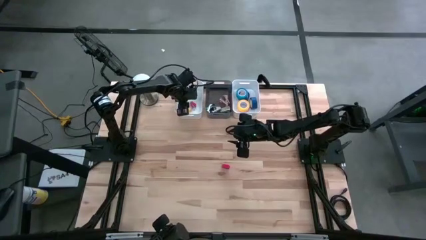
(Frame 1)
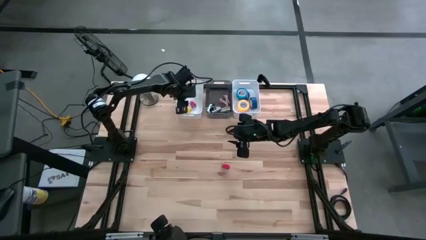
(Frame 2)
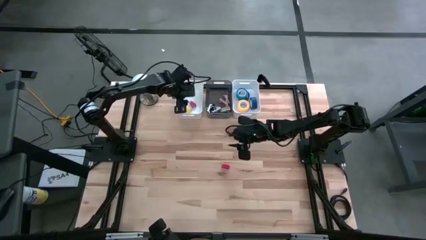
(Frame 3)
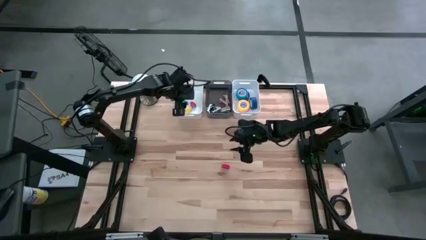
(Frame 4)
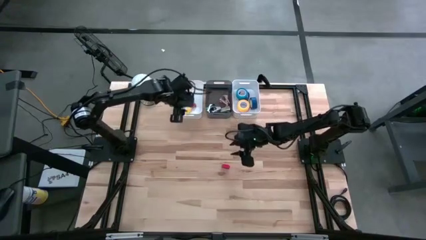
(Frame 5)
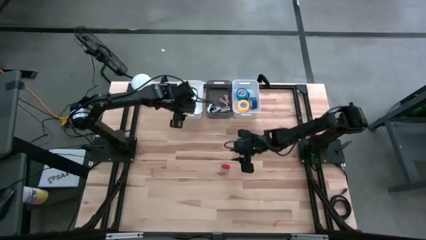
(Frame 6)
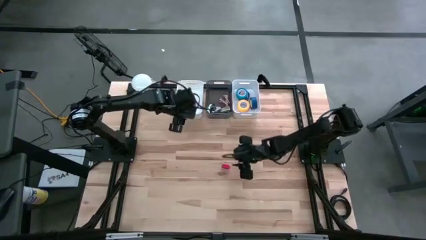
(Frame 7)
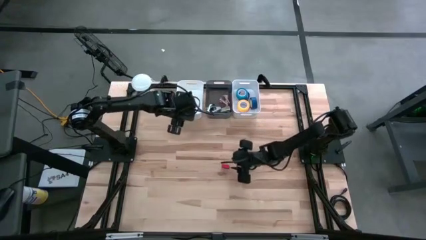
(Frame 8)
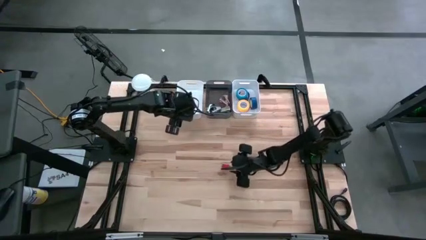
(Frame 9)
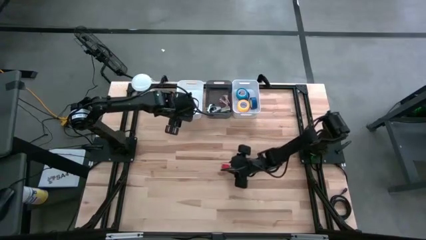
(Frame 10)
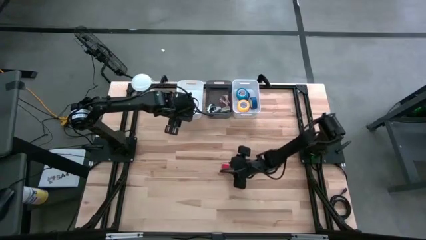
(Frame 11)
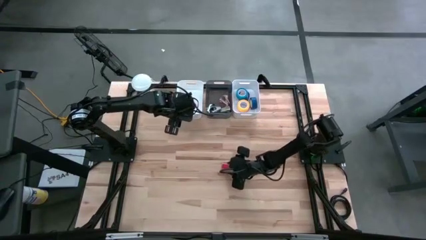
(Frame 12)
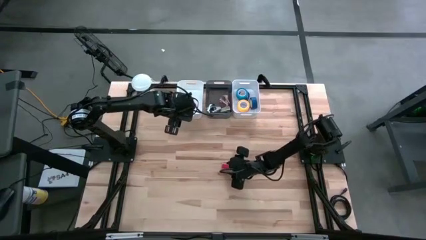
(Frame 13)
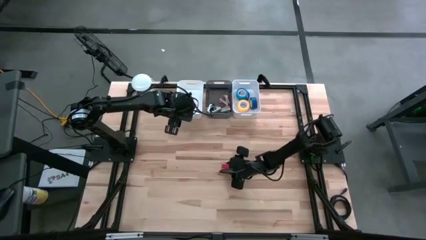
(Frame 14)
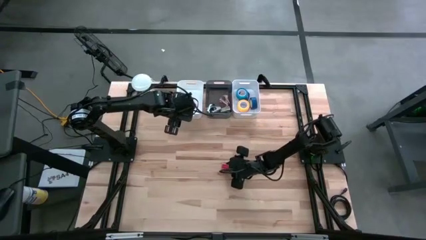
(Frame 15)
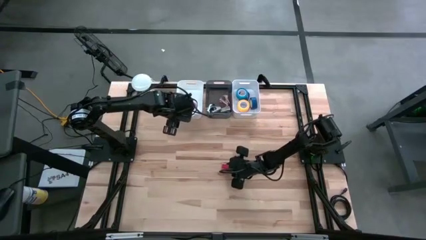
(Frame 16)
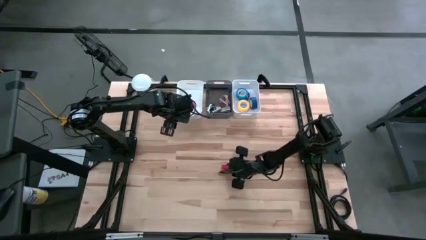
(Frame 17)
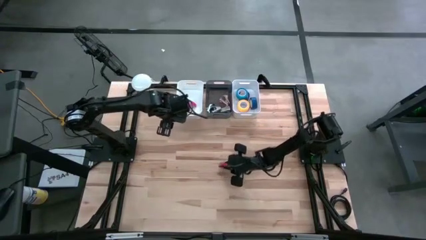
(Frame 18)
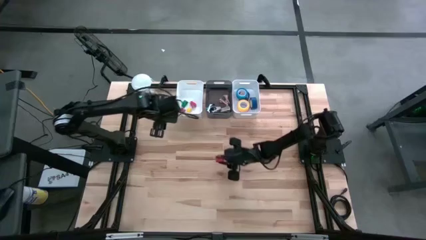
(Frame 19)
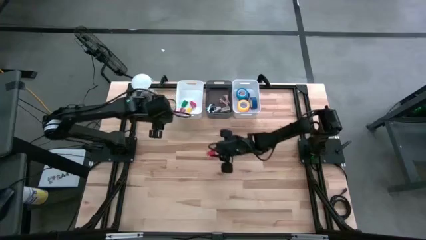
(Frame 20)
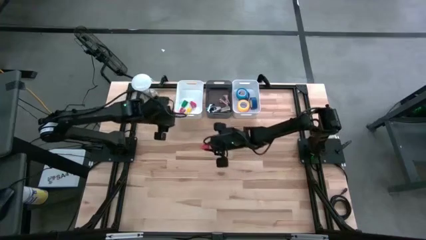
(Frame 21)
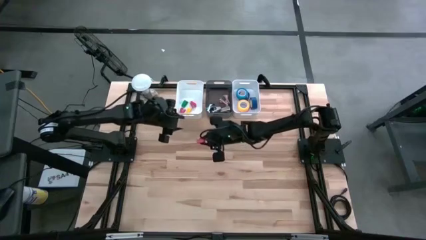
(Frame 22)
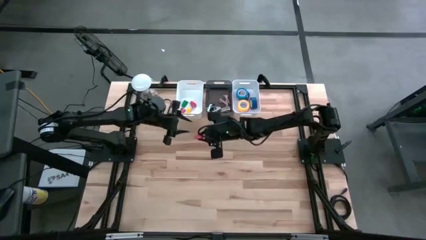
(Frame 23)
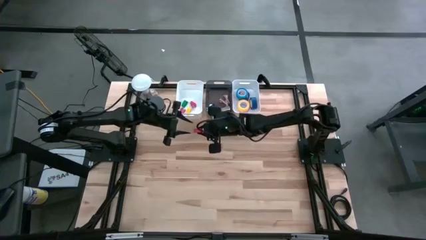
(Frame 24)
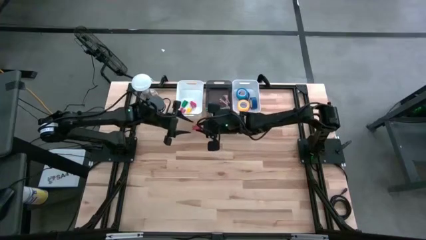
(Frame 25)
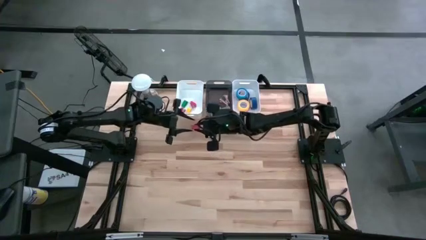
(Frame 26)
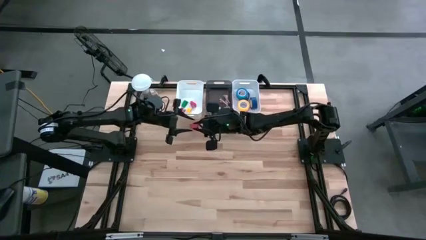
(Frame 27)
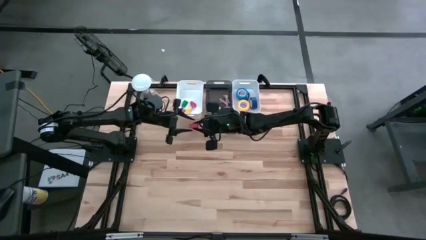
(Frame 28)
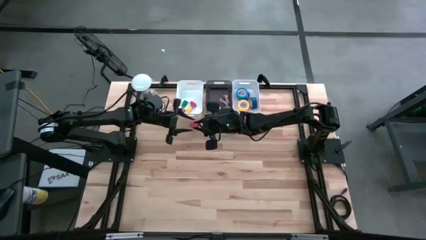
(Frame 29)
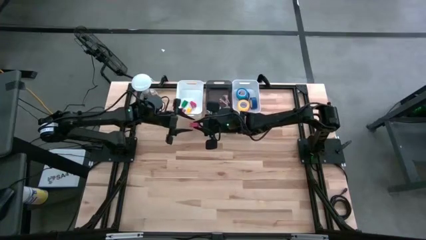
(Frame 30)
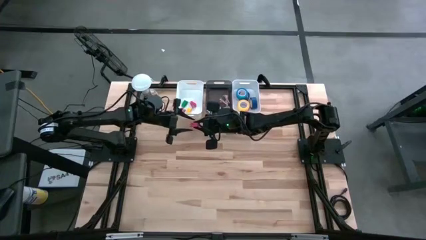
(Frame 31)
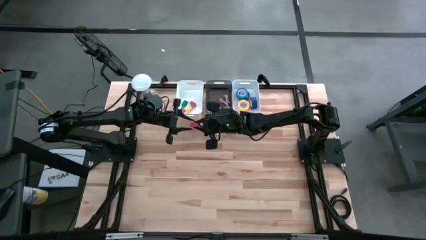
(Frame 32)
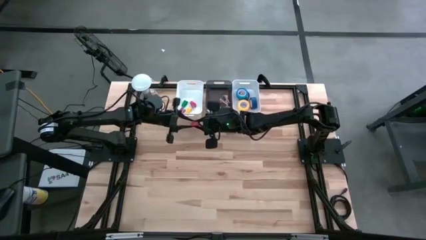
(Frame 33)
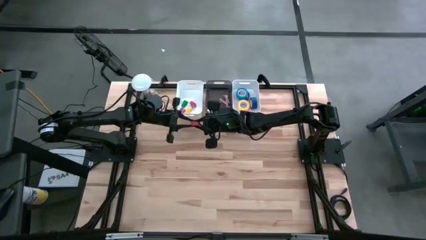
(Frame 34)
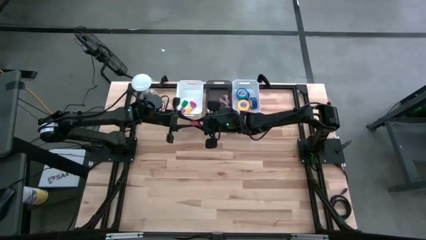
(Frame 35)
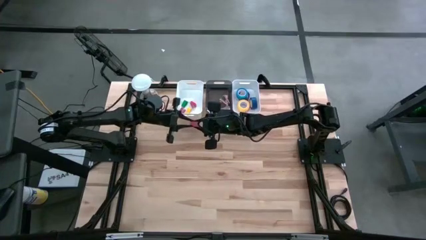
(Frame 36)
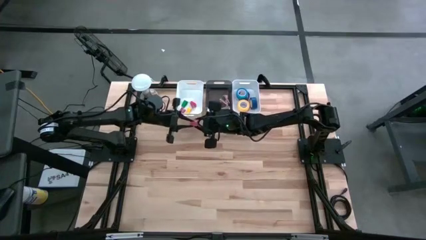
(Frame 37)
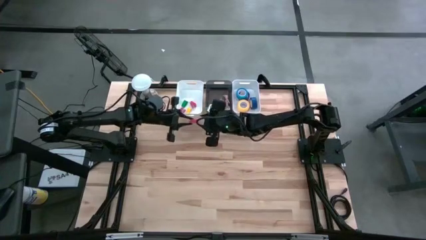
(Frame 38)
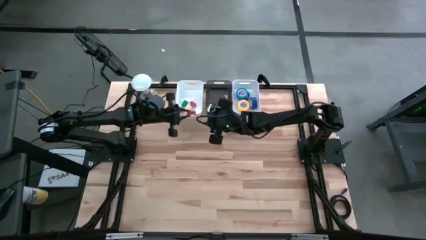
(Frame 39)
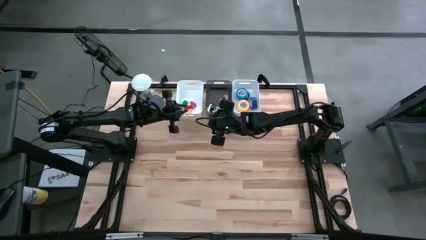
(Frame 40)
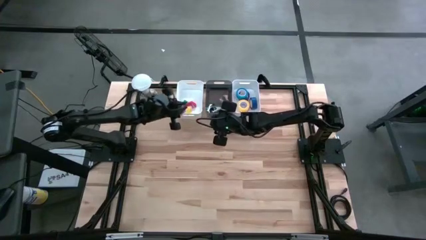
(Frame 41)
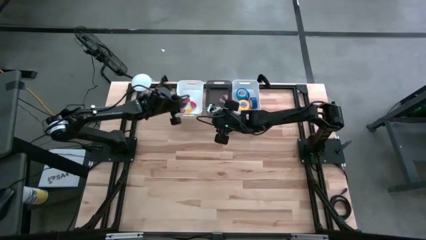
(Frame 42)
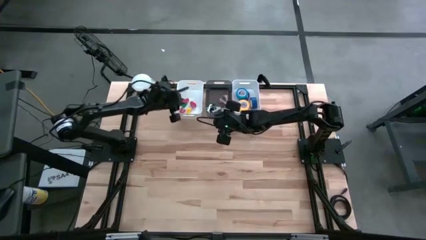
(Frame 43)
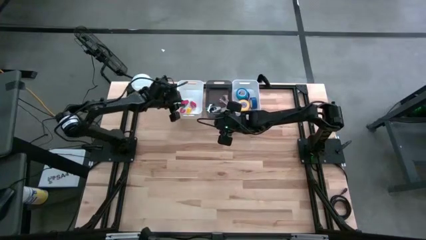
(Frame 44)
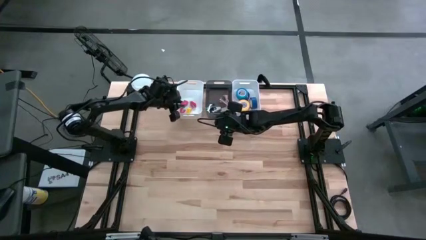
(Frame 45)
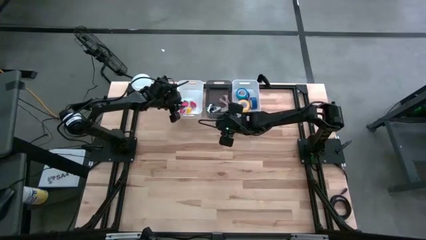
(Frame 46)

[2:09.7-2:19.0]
Task: Pick and place Stapler, Stapler remover, tape
Put the red stapler into the left white bin

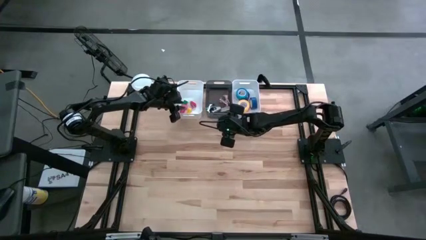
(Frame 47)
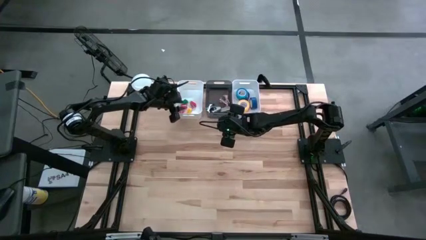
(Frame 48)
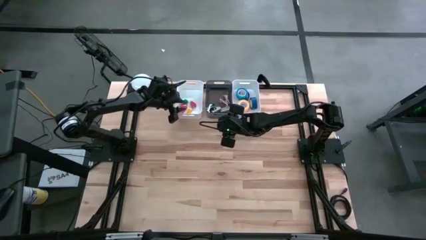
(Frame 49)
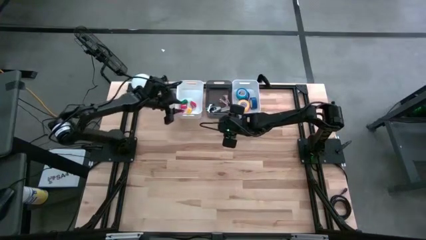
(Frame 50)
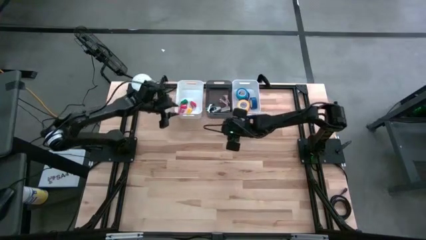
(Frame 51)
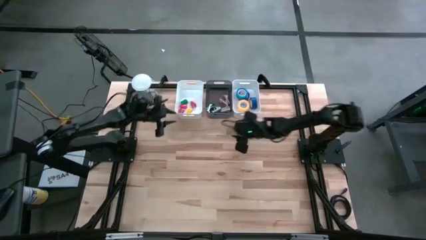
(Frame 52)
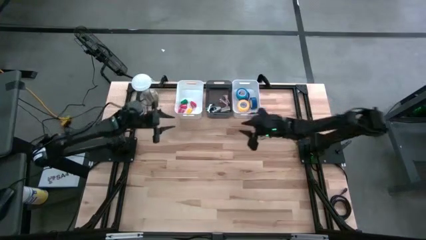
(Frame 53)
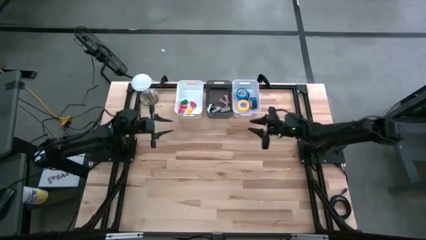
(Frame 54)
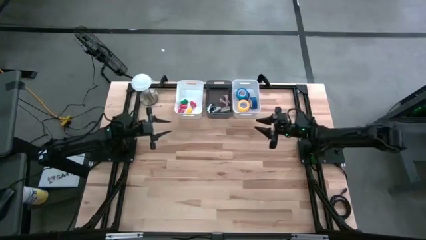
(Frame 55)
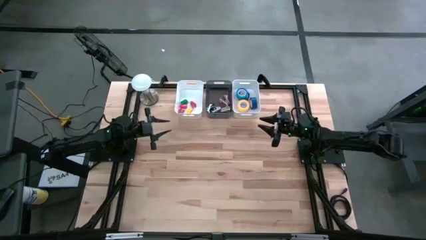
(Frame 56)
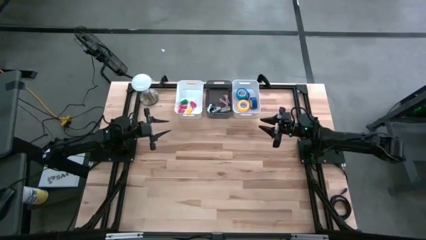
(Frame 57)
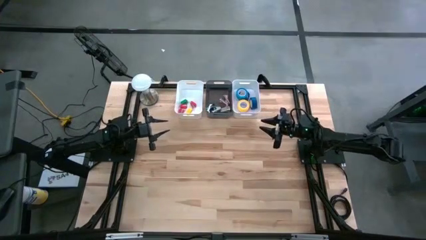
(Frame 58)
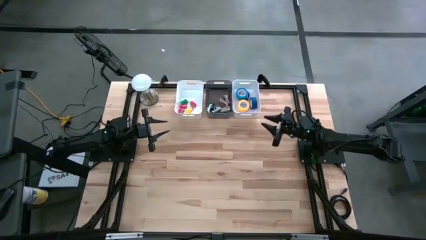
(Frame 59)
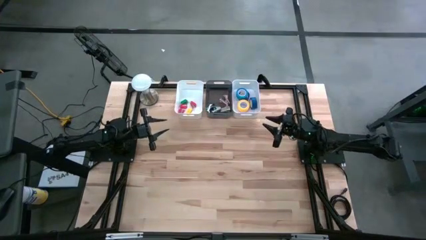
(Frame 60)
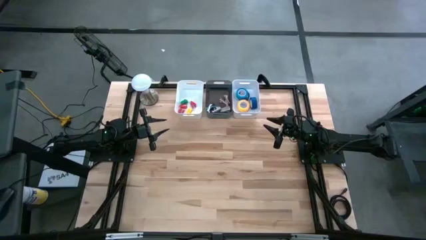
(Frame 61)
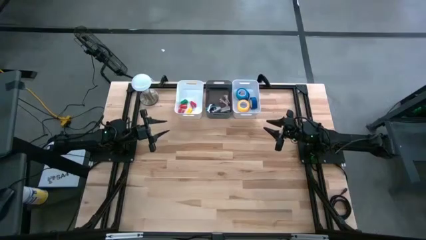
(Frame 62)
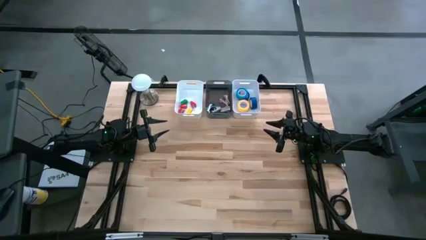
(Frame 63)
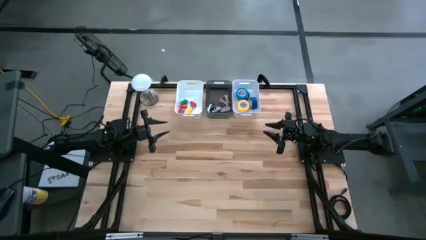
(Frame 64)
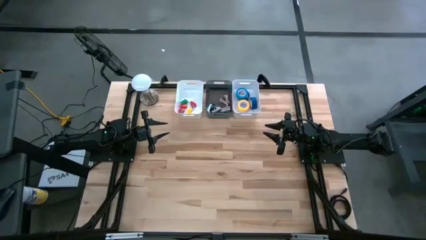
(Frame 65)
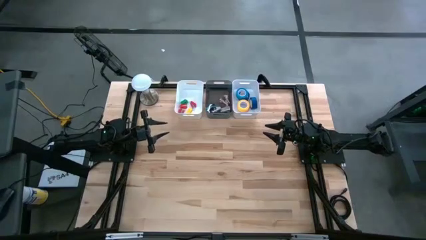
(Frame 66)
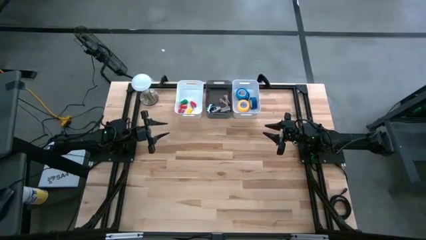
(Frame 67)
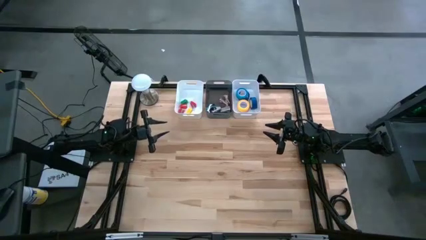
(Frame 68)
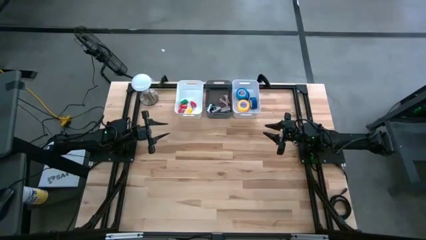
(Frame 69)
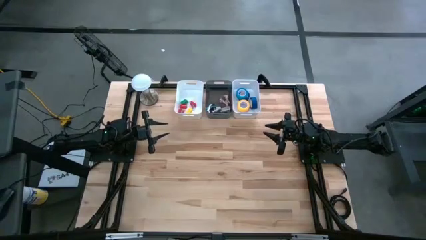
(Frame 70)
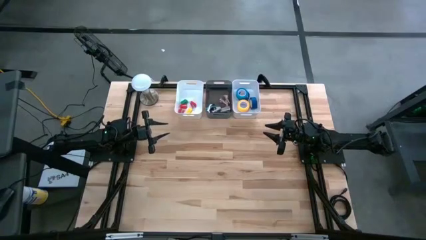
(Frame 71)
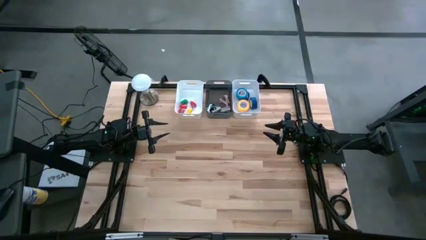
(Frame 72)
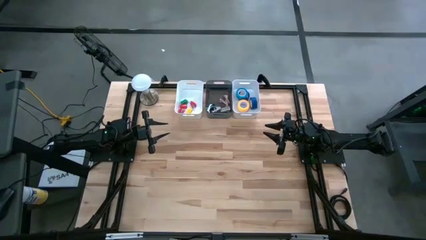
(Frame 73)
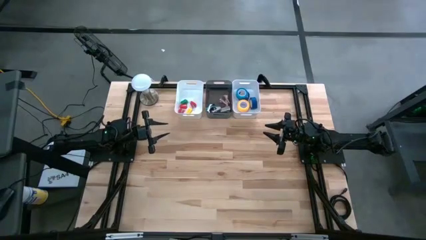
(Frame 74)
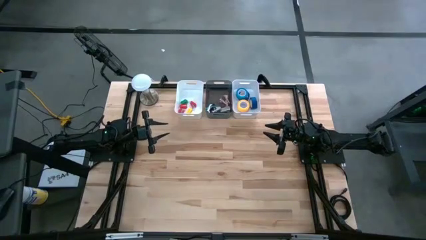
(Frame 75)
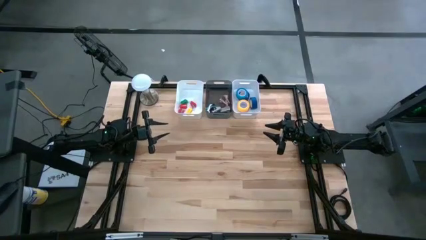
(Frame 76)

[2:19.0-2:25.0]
Return to Home Position

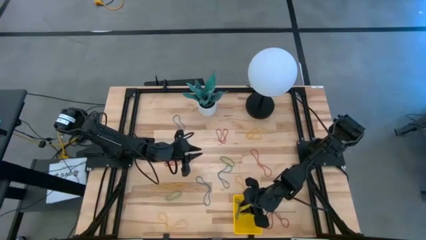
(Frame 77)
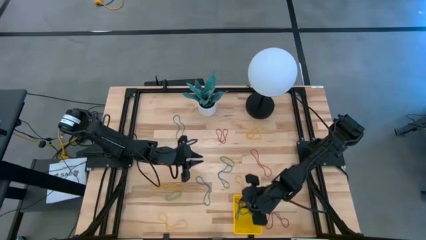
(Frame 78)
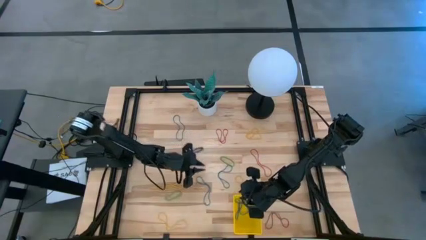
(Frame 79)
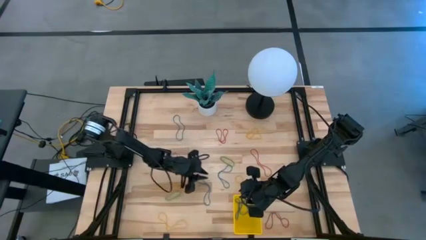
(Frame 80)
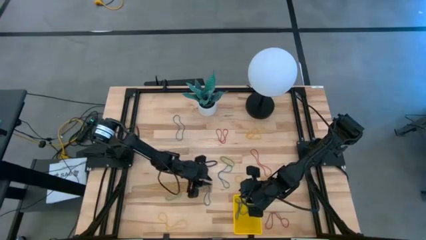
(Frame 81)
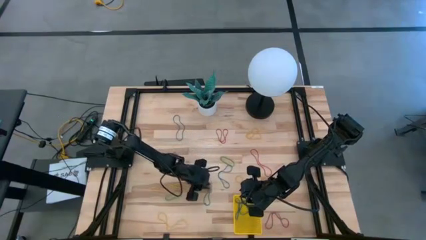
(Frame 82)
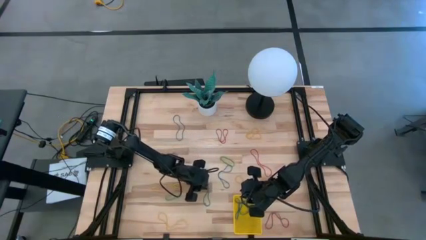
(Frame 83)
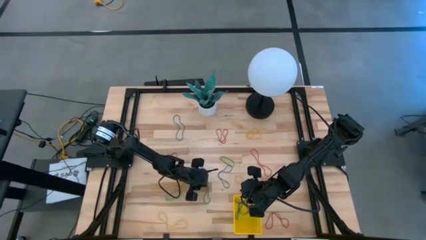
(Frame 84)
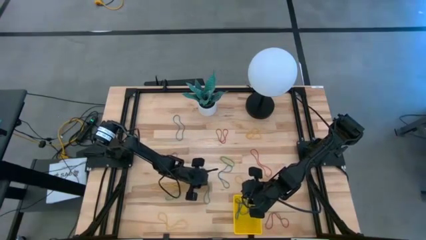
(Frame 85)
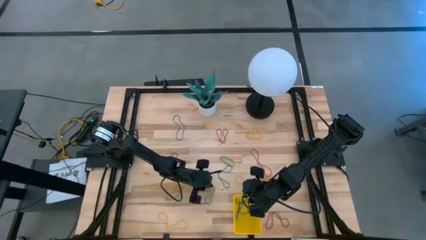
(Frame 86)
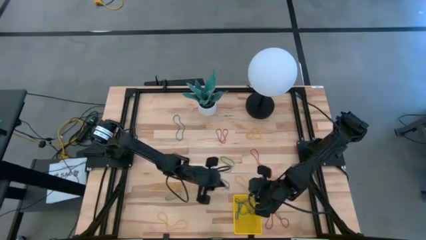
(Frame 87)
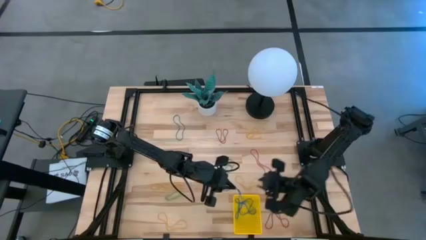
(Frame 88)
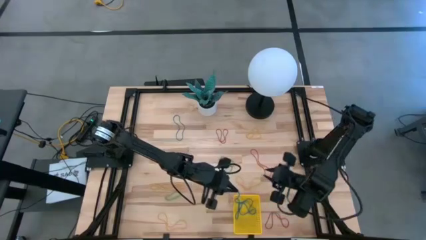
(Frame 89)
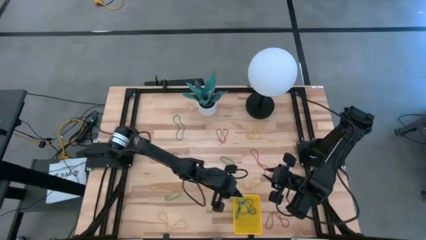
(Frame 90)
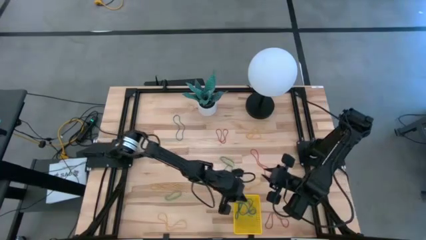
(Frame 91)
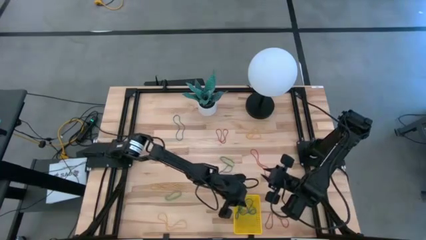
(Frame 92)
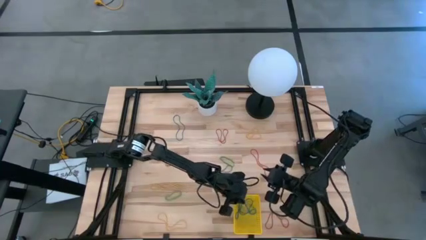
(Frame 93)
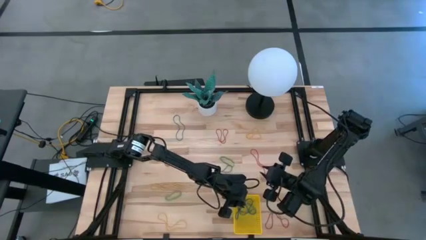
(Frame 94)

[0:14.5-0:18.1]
Task: Pick and place rubber bands into bin
Put the blue rubber band into the yellow basket
